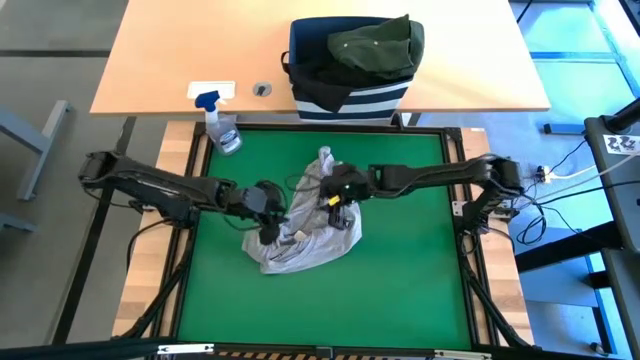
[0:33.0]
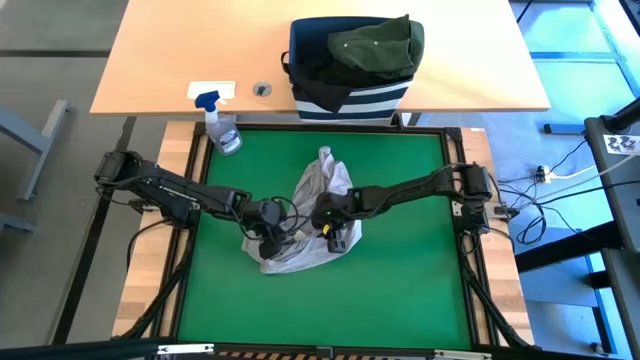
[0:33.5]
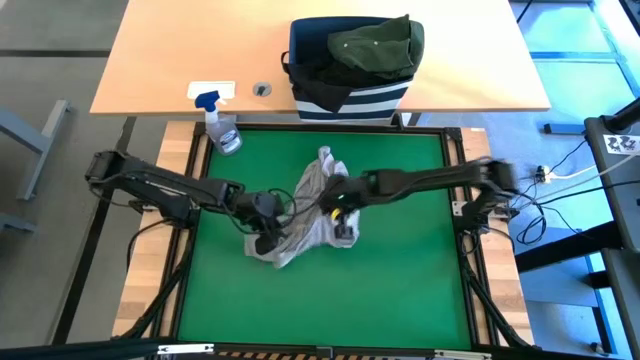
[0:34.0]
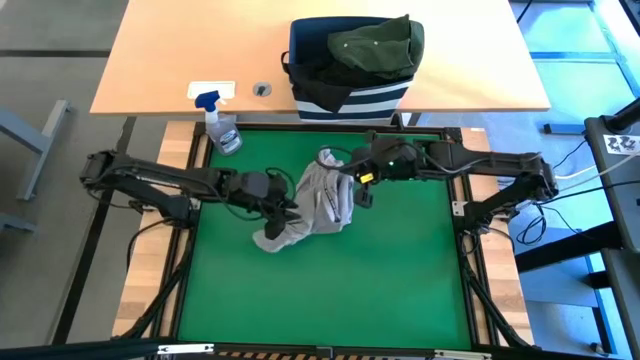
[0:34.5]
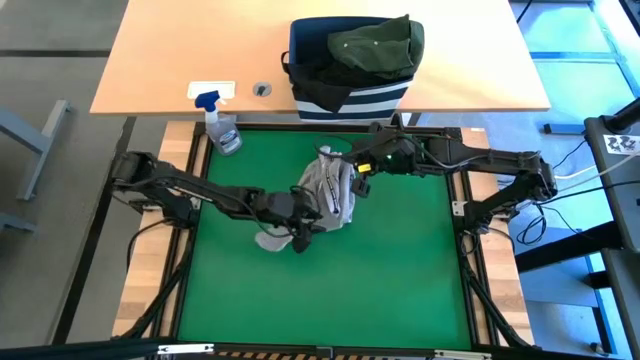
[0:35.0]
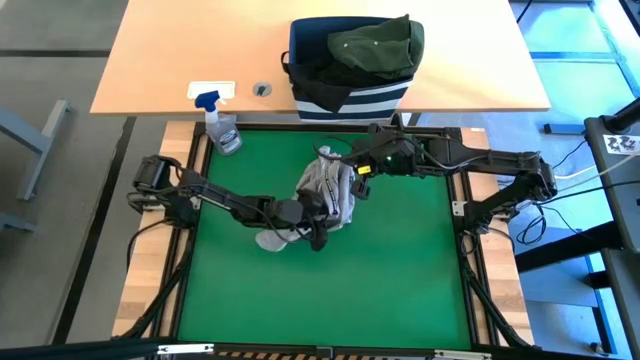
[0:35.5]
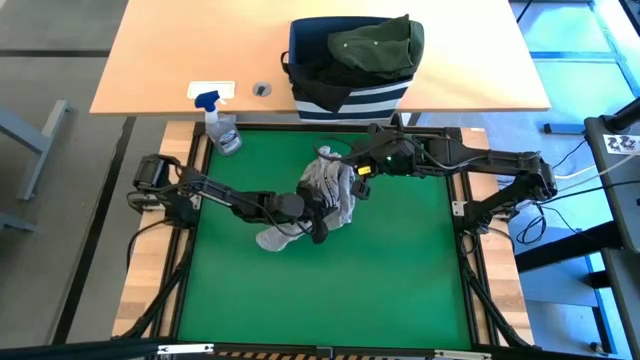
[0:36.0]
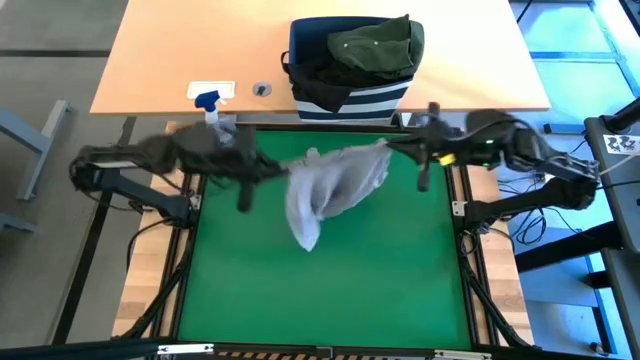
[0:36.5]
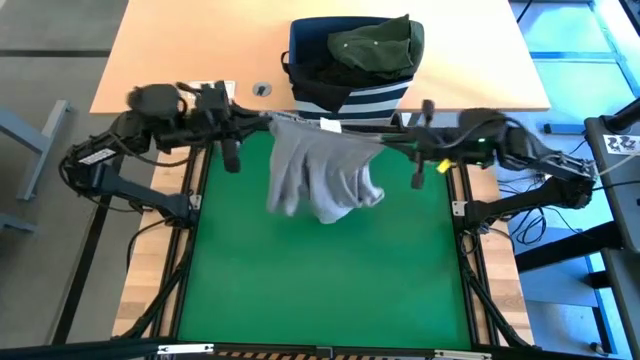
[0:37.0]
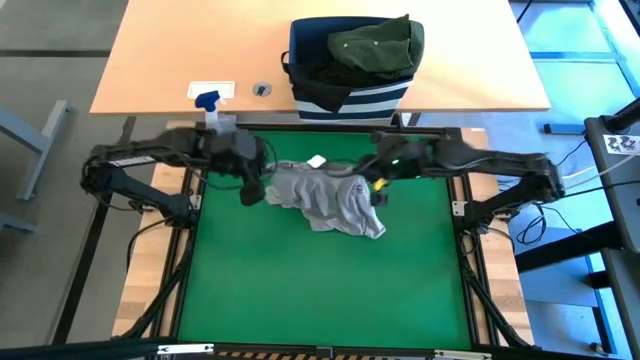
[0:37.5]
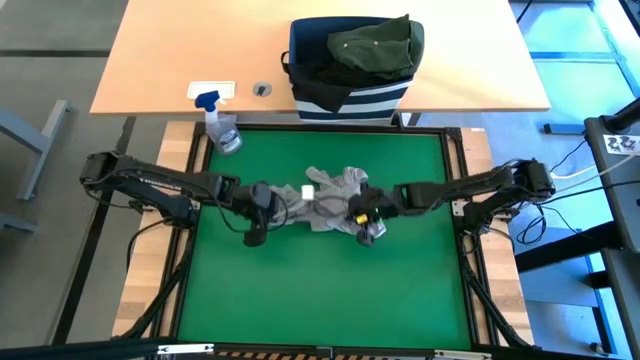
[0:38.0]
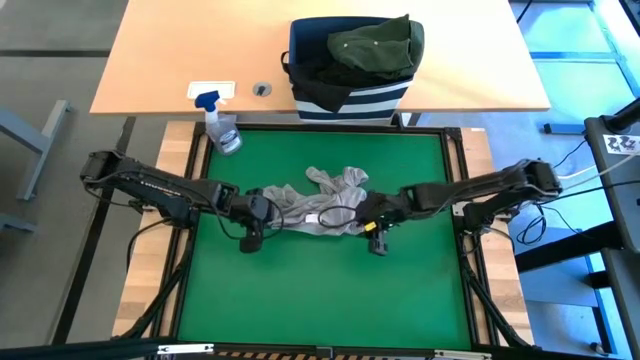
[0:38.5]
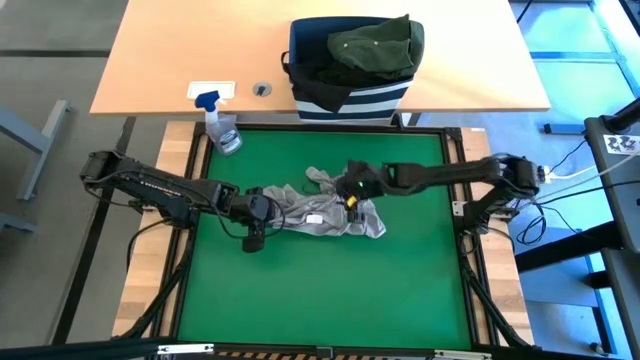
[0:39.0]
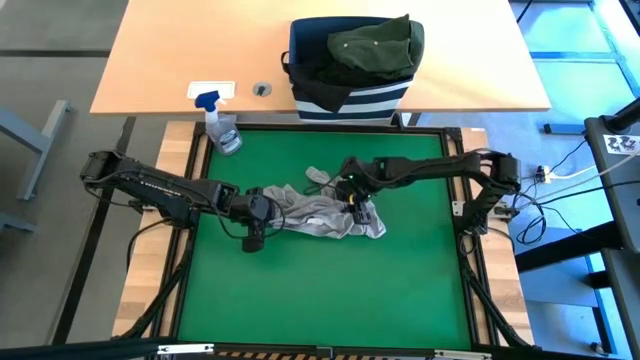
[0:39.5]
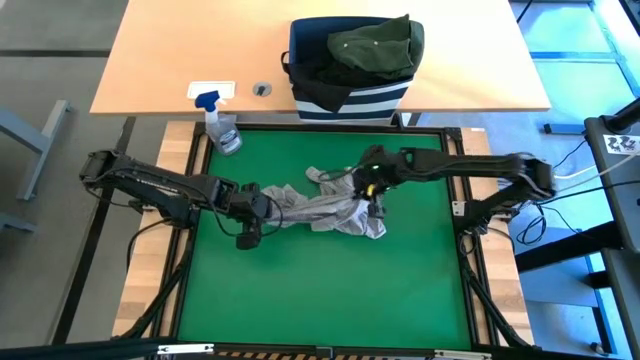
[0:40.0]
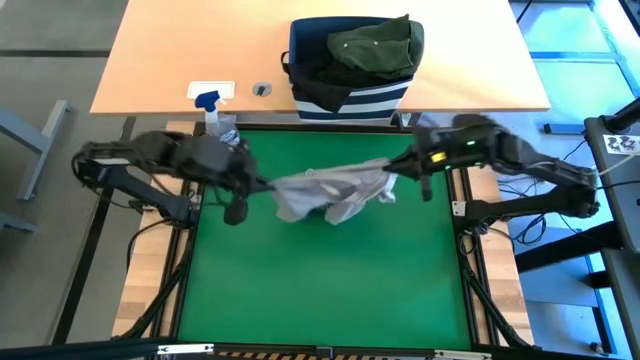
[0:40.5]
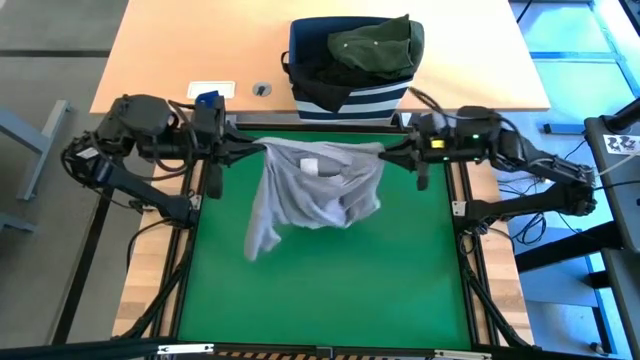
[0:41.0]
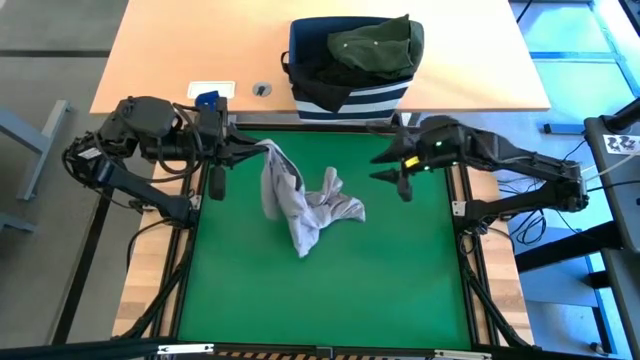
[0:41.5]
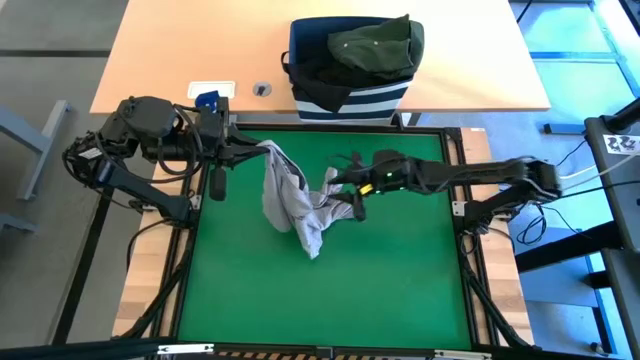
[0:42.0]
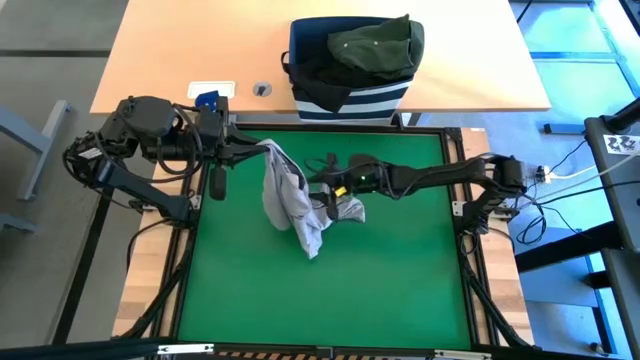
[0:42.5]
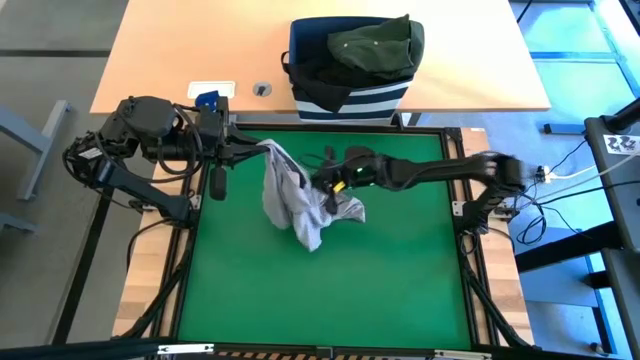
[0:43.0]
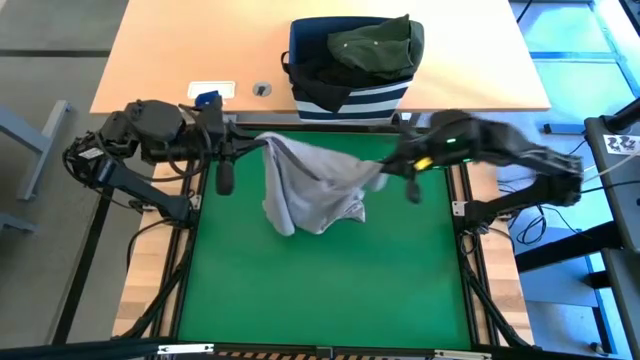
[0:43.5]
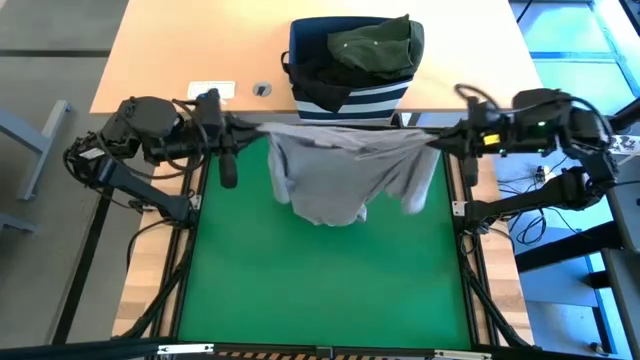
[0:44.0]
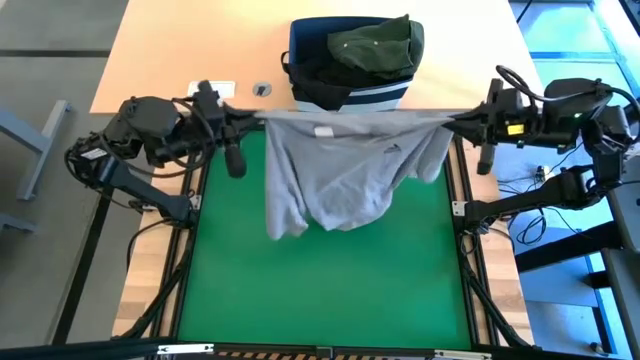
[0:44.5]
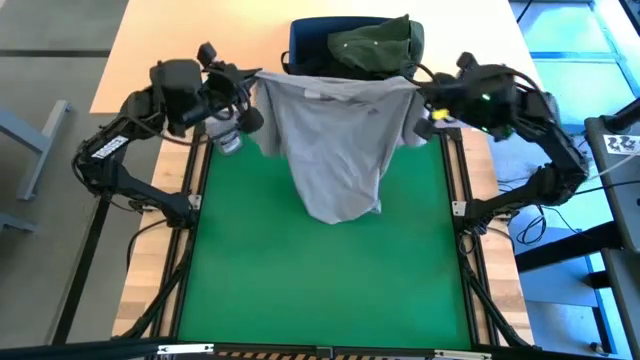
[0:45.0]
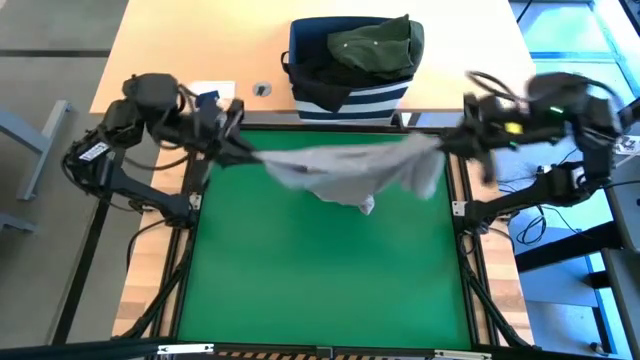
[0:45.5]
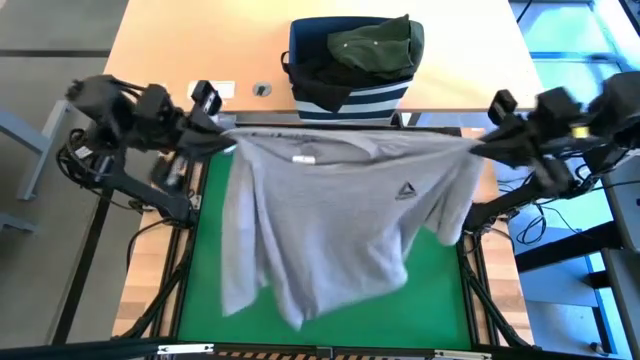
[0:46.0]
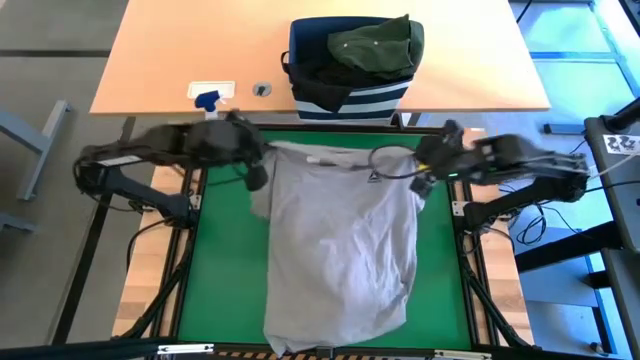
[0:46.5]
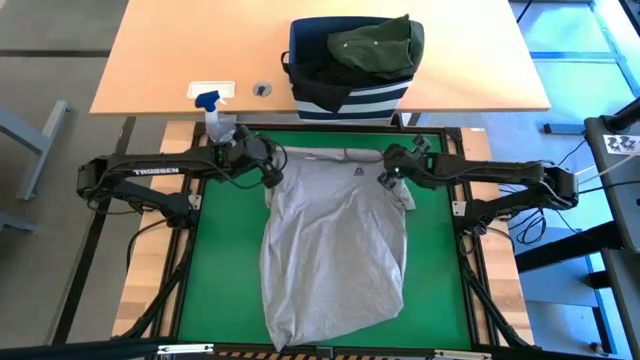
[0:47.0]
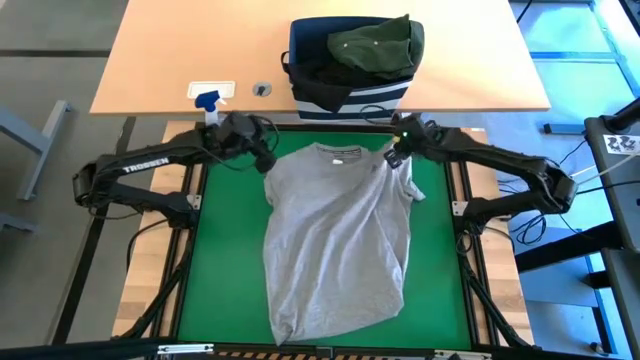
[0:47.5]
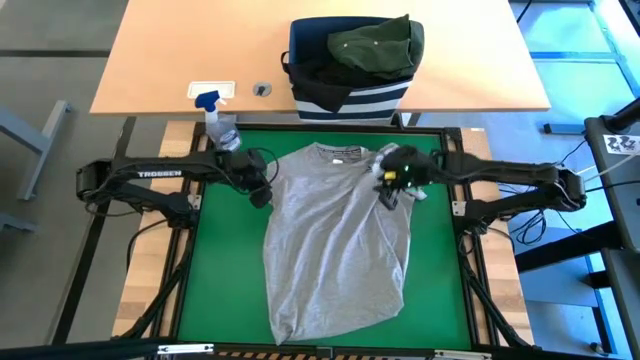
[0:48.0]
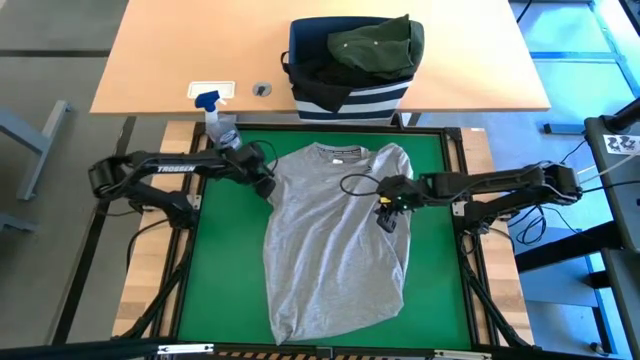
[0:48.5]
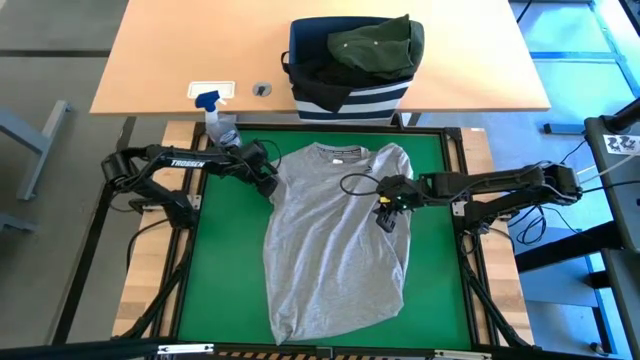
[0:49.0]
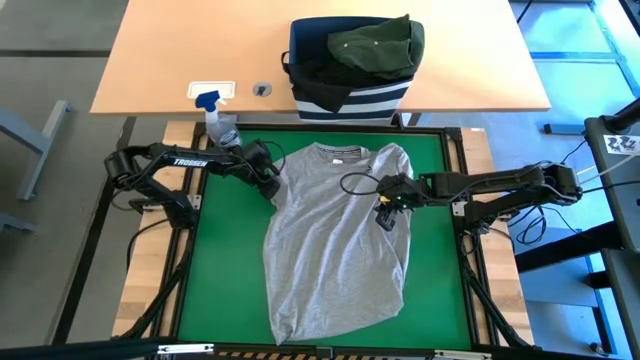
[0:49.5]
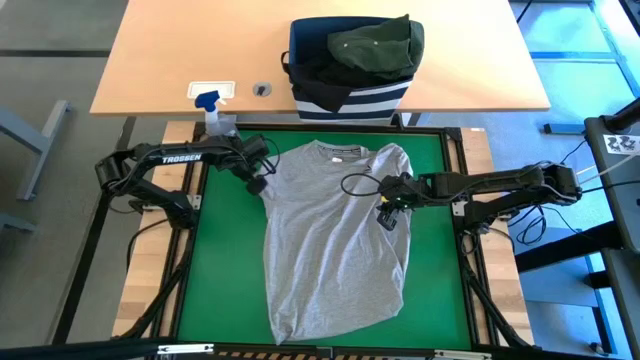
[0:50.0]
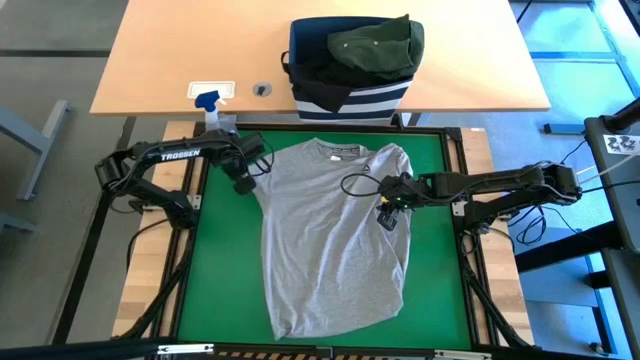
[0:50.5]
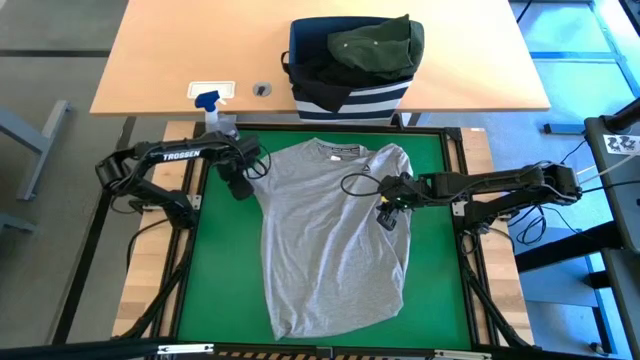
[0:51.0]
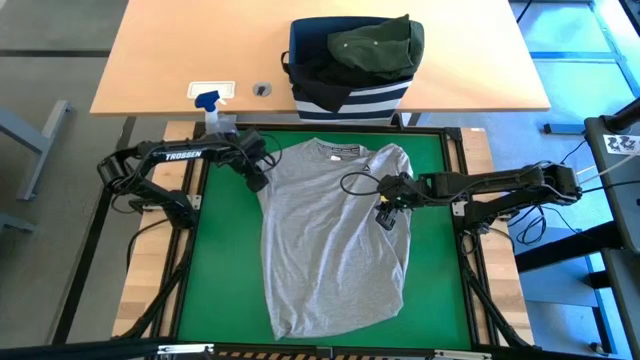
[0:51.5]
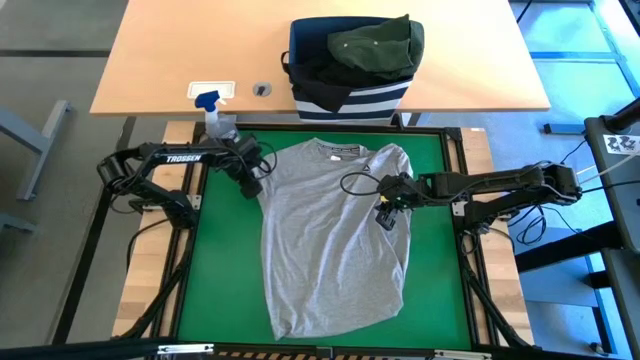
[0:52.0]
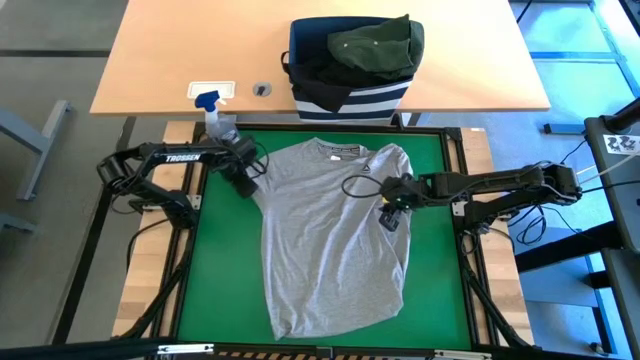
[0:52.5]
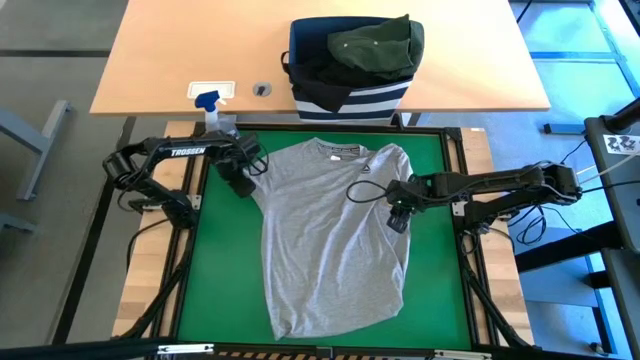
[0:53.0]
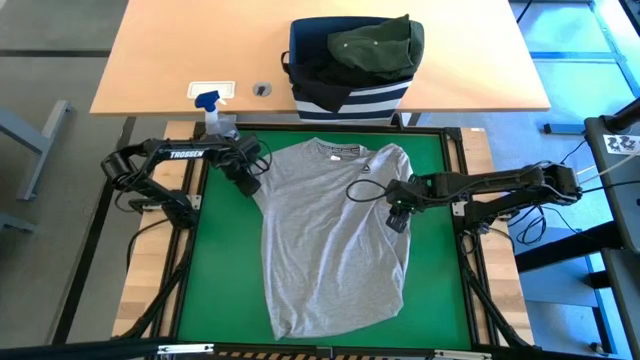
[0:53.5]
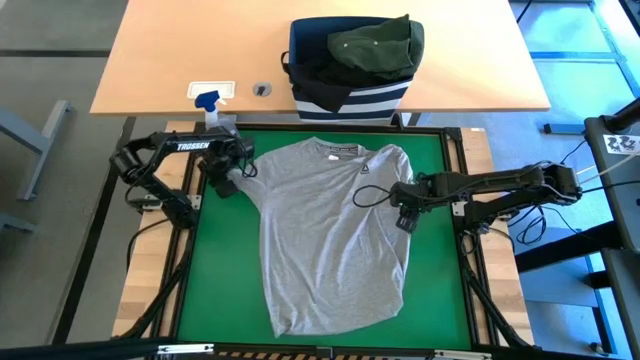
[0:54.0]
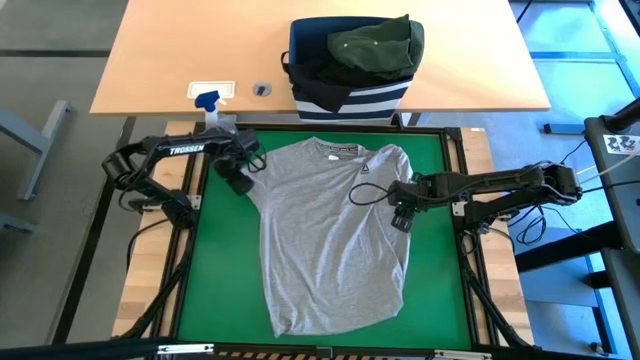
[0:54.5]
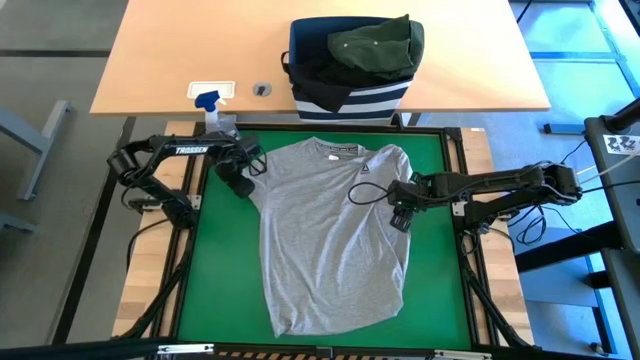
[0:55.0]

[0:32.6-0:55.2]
Task: Fold Laundry from Bin
Fold the gray shirt
